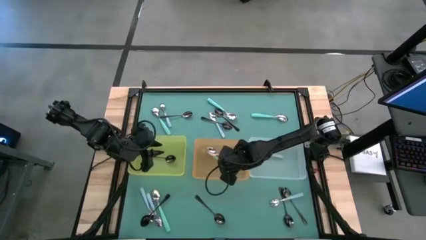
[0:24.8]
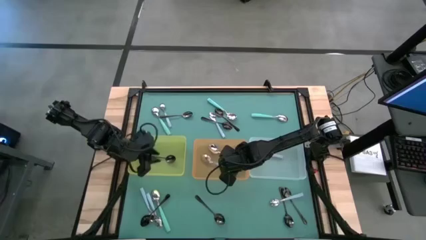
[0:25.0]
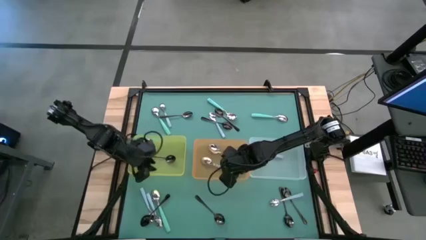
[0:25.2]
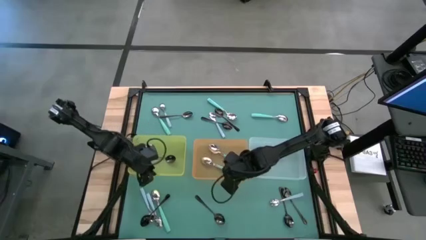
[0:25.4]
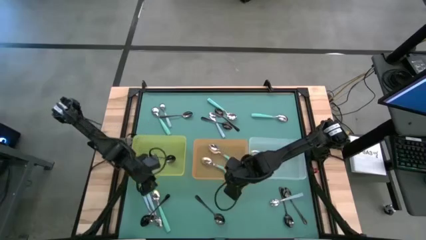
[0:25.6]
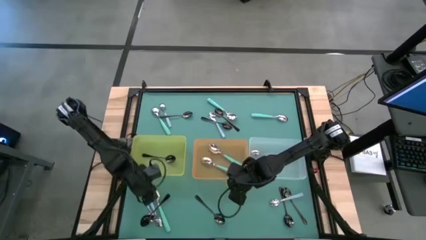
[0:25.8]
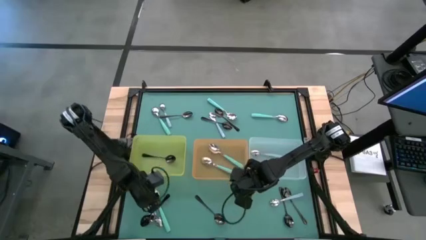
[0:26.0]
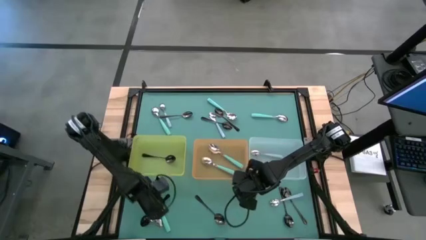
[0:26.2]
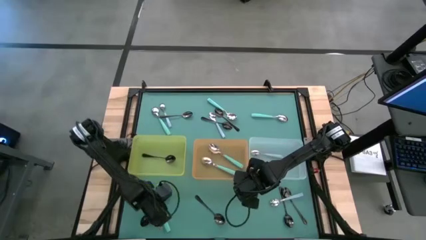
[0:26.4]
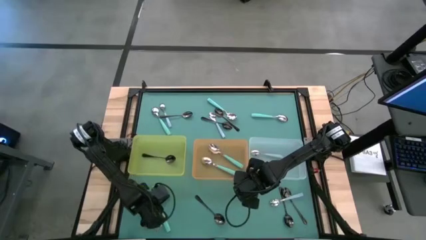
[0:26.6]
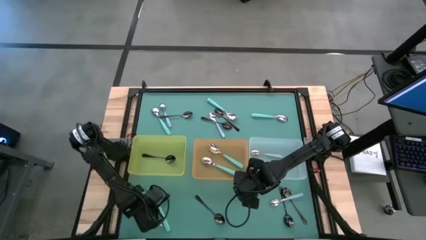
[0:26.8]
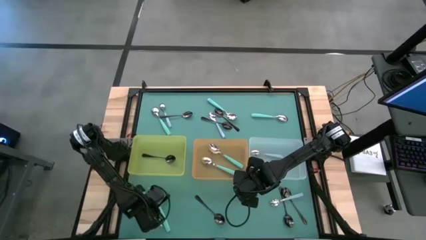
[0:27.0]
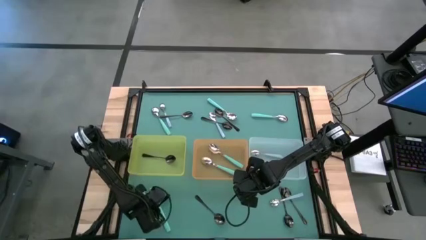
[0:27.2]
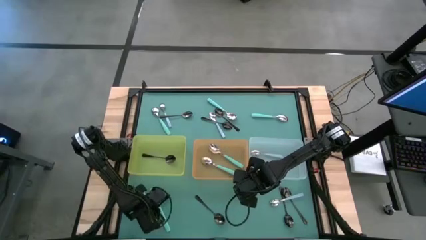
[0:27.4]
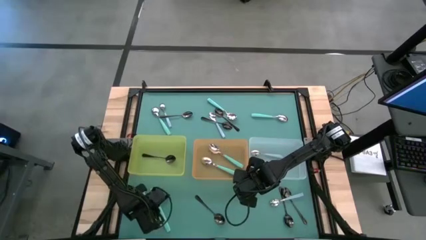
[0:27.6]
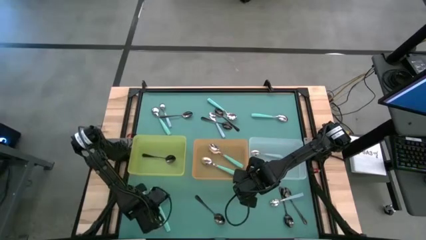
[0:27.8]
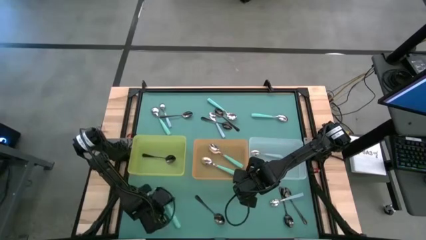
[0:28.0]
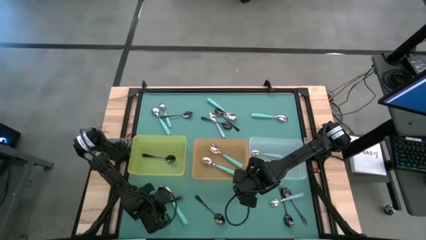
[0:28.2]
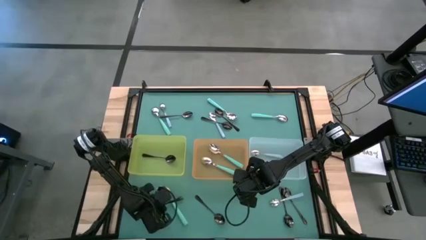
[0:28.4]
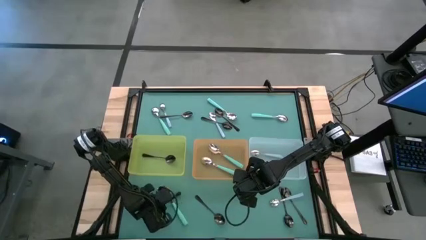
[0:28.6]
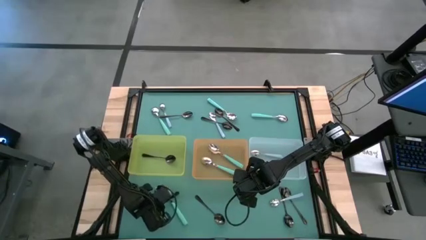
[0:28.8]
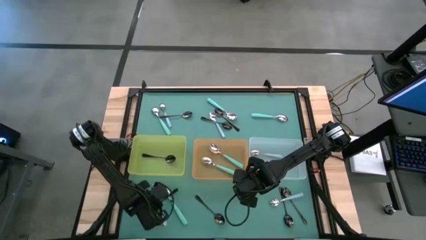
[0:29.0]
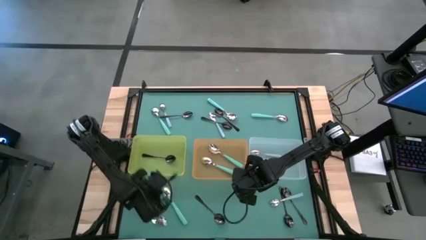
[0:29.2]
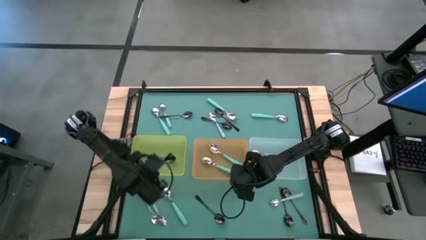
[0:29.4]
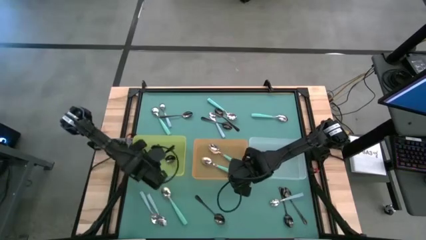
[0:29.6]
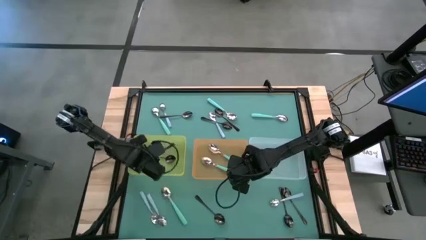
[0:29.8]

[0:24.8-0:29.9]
Task: Sort silverware by color (type)
Put the black spoon into the yellow bin

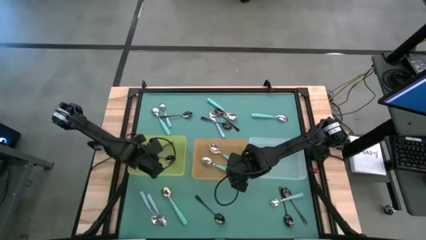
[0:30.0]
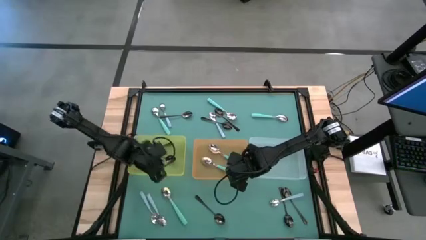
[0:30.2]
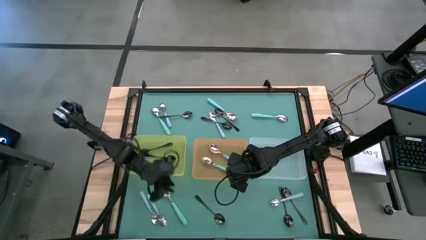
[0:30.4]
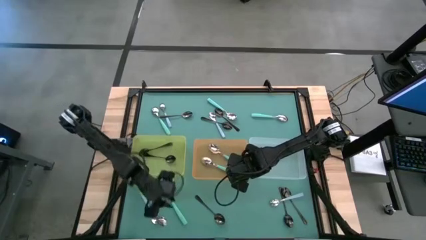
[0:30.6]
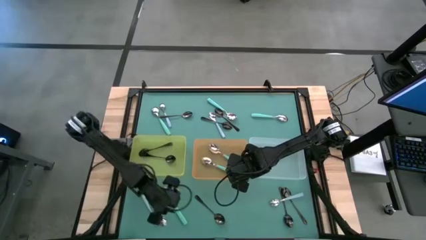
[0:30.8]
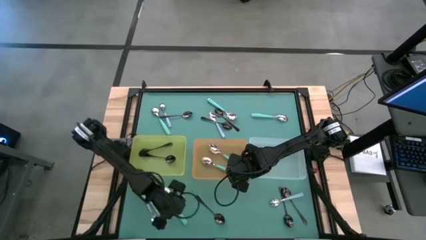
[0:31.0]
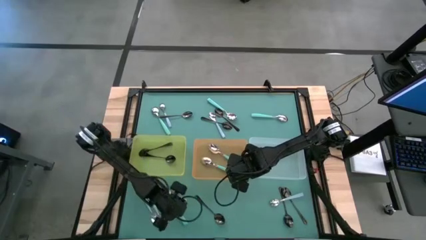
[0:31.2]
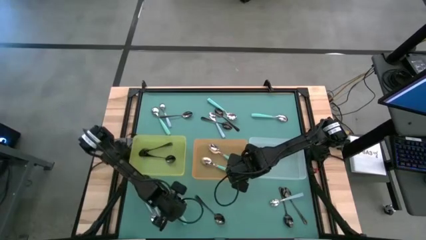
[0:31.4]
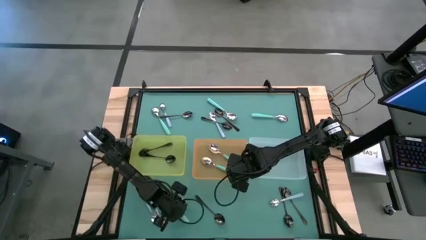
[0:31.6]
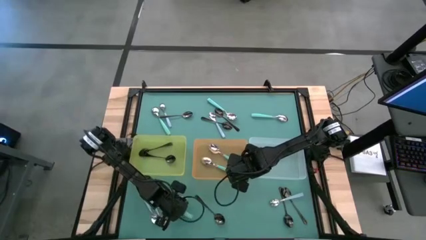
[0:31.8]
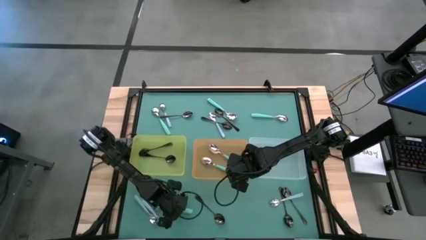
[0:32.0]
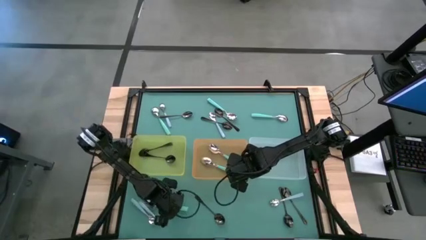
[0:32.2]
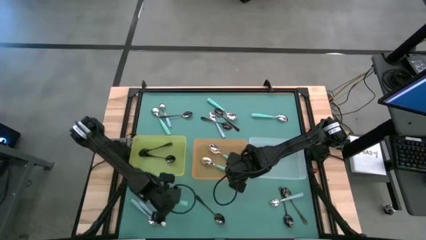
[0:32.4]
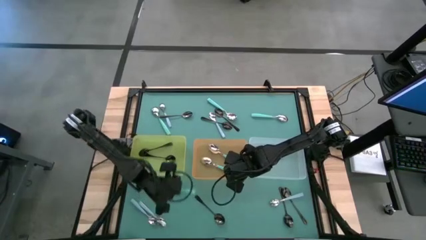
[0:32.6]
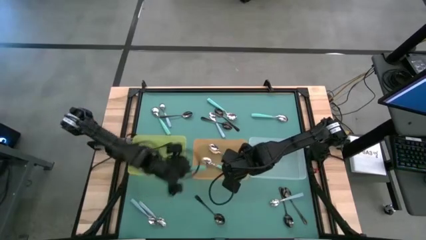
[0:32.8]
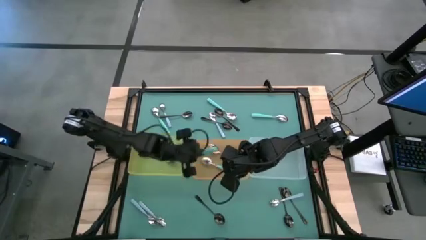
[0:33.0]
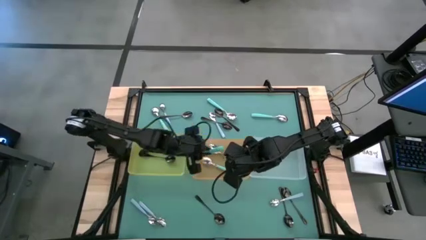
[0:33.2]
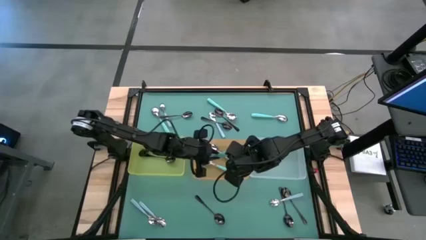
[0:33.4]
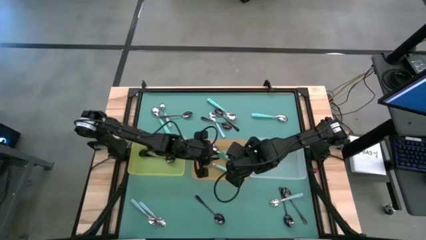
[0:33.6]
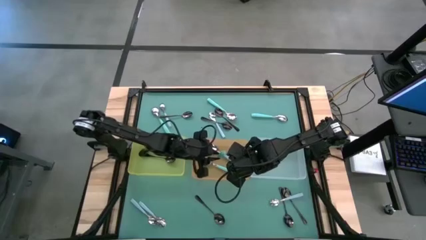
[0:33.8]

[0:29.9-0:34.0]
Put the green spoon into the orange bin

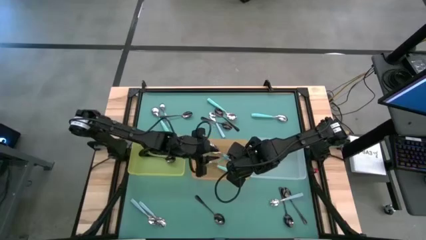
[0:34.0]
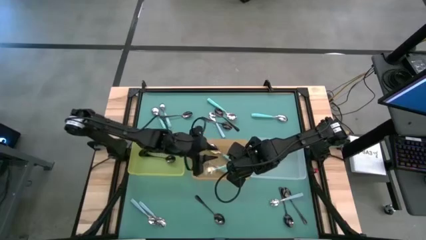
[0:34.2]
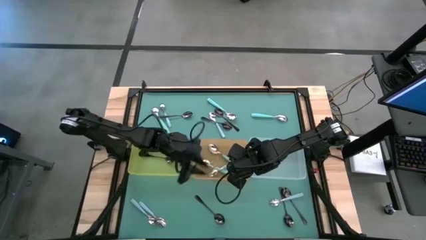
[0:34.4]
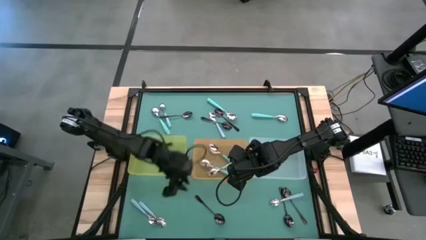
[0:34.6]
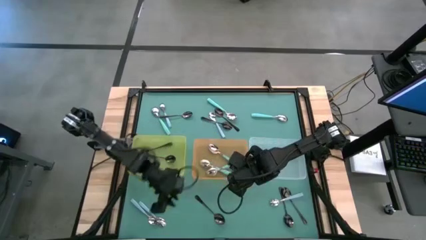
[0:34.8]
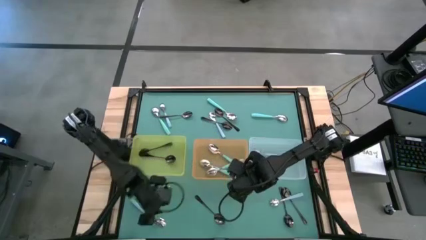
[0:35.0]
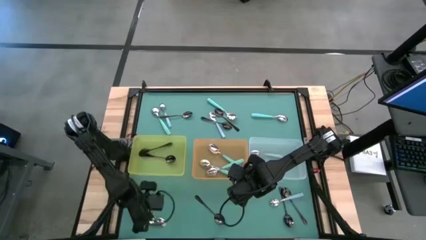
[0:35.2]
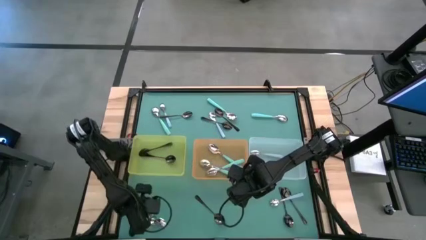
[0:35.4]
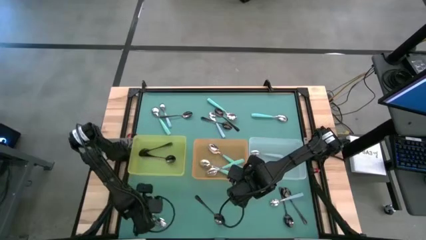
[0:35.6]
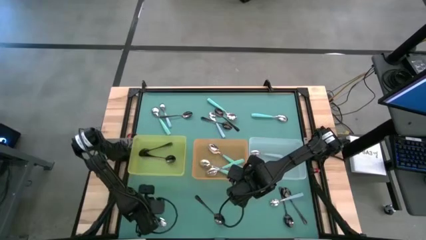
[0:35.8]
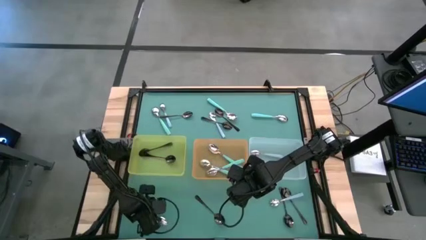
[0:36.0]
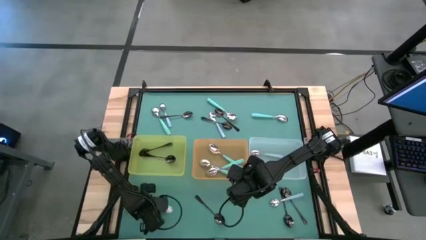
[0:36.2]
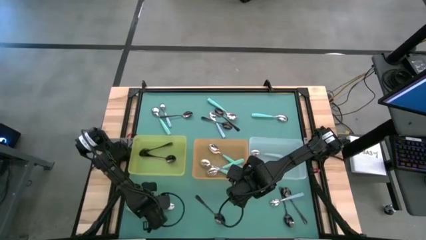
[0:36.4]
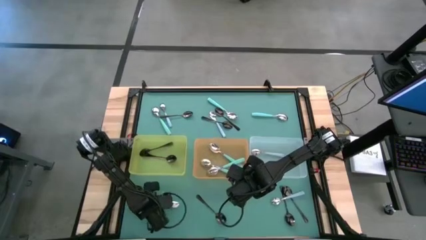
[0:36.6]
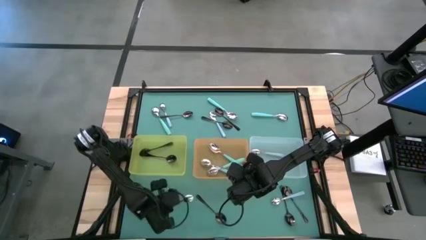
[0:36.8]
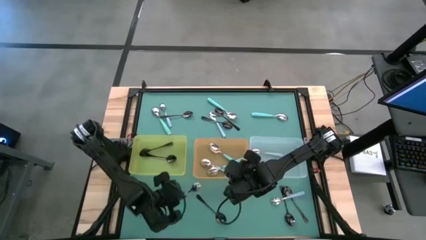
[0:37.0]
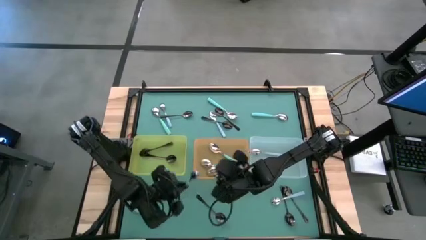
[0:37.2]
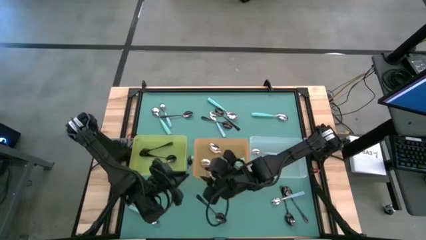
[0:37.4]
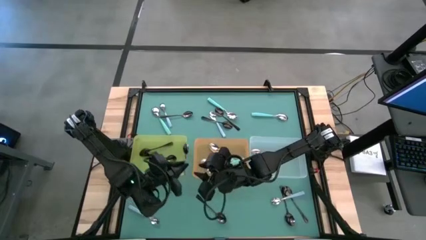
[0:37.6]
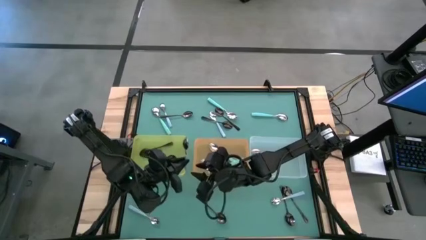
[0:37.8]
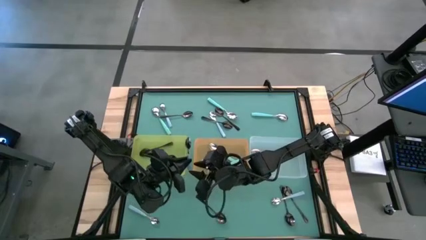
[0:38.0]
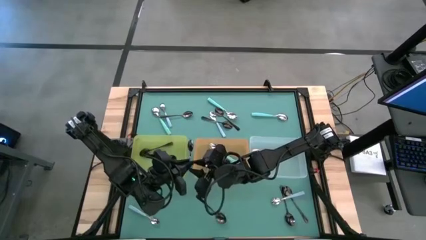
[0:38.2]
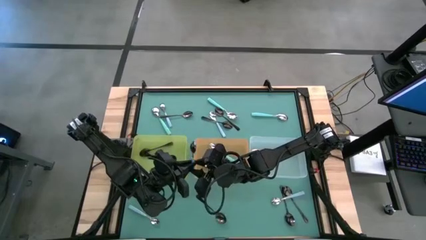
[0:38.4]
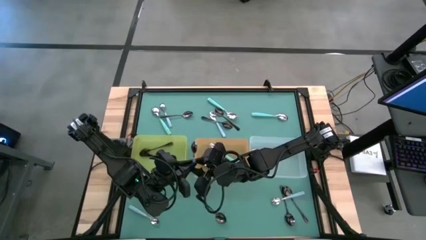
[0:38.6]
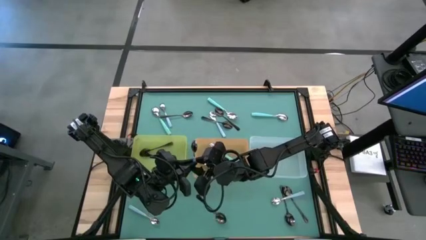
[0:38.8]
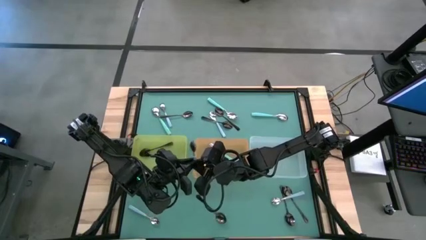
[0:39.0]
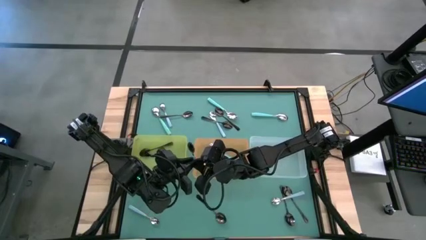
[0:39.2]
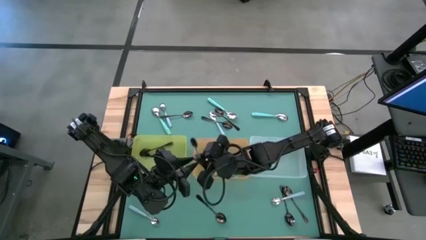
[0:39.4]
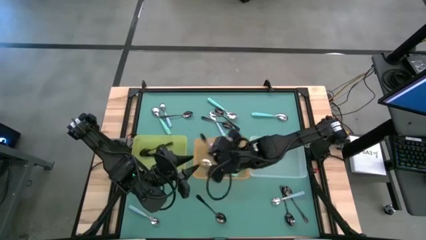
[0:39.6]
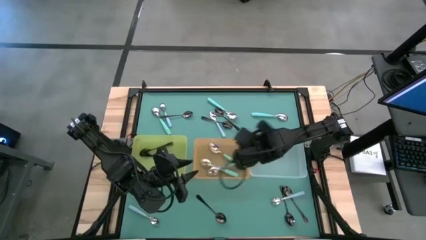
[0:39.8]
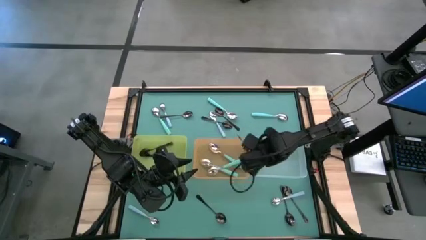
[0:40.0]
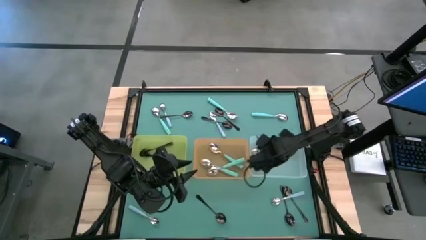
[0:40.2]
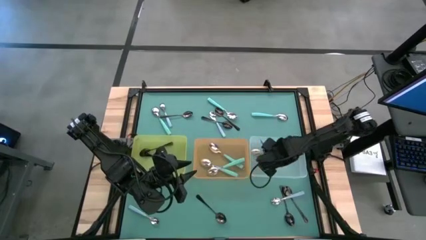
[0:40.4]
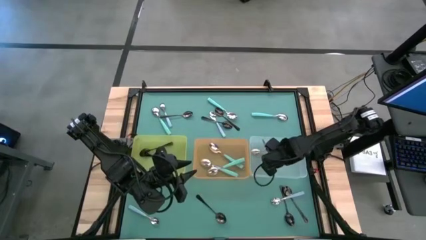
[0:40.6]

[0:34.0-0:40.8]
Put the blue spoon into the white bin

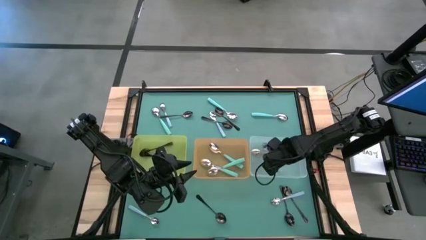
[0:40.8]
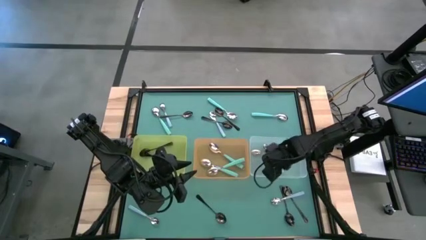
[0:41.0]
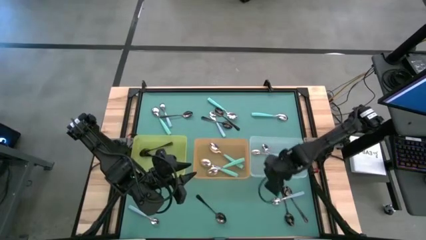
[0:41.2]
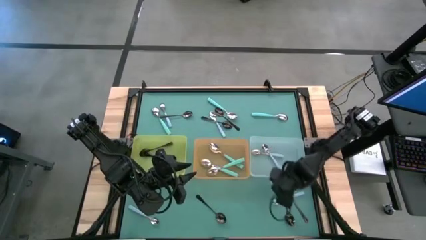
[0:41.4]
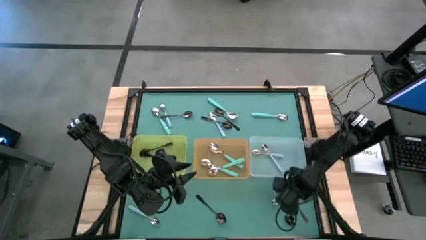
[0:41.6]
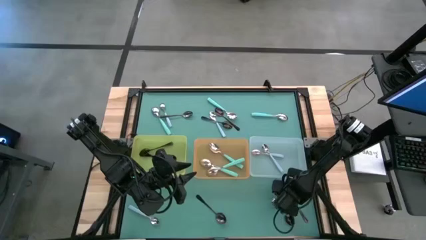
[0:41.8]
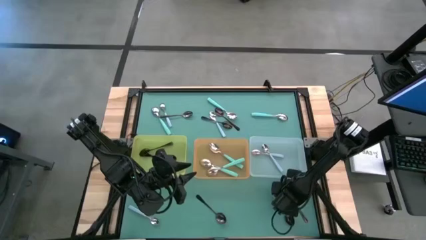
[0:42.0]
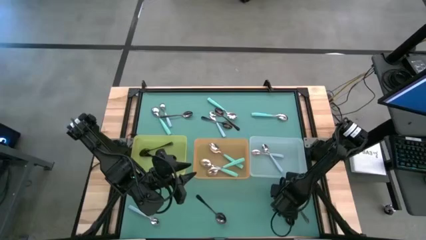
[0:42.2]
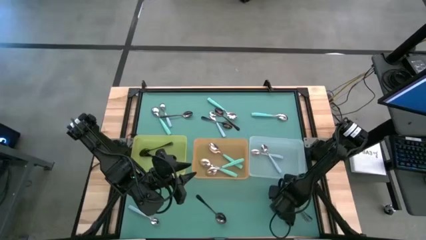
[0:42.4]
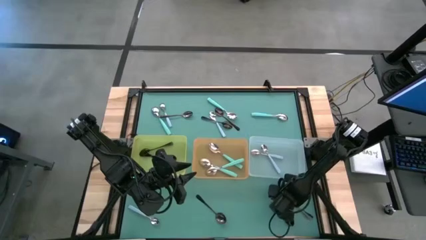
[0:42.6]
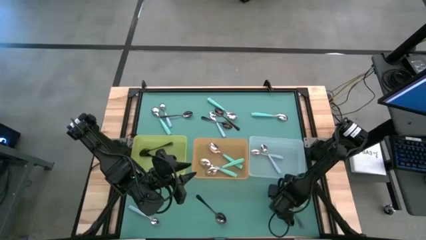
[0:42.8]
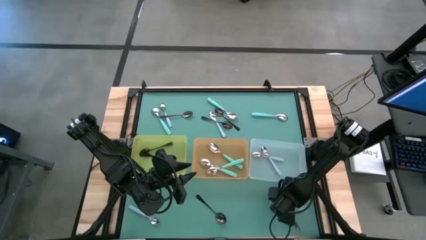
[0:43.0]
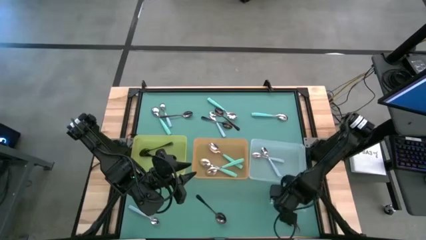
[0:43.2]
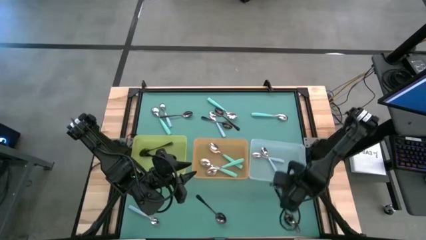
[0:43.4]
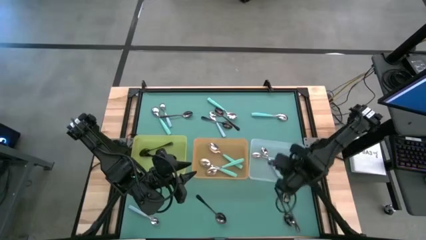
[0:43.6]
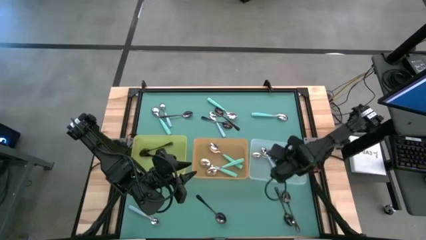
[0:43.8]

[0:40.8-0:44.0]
Put the blue spoon into the white bin
